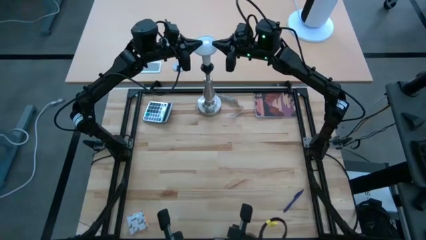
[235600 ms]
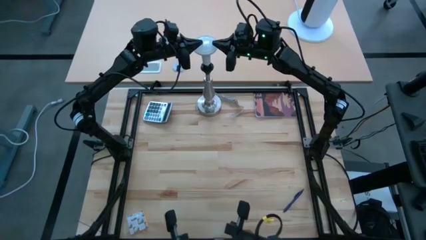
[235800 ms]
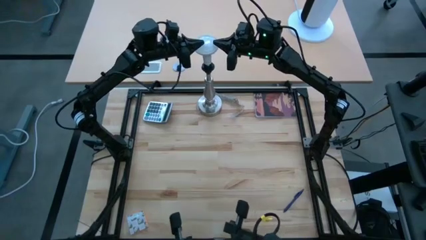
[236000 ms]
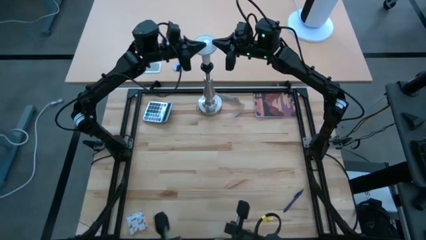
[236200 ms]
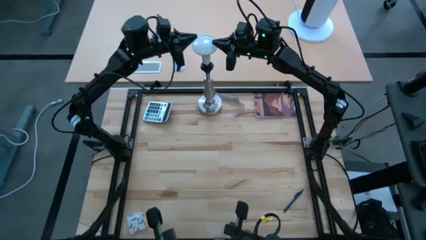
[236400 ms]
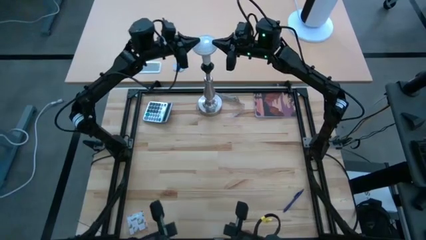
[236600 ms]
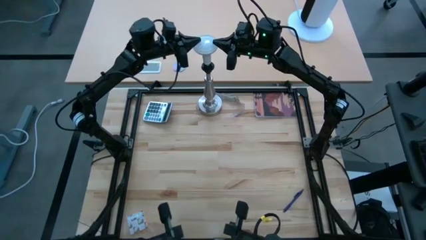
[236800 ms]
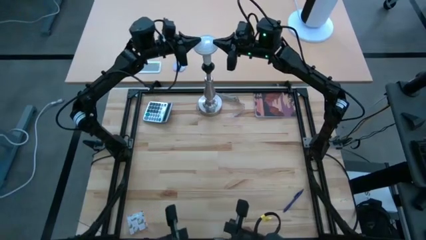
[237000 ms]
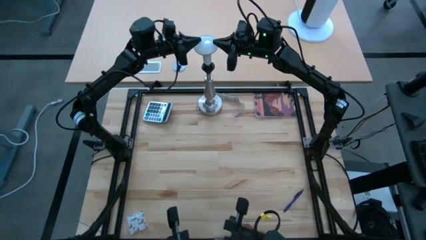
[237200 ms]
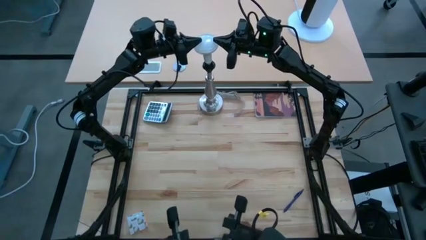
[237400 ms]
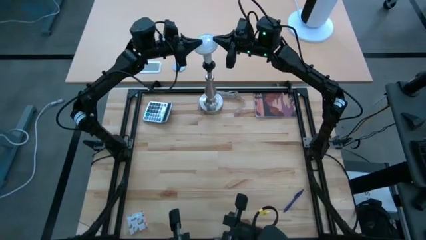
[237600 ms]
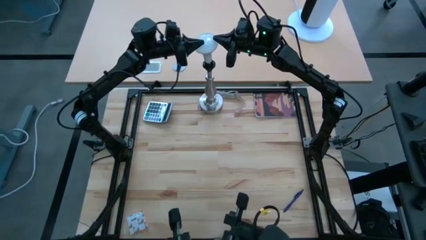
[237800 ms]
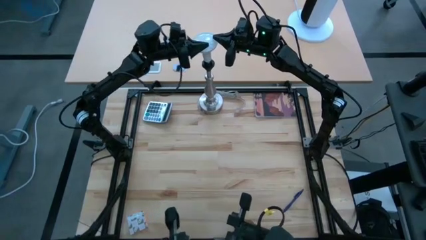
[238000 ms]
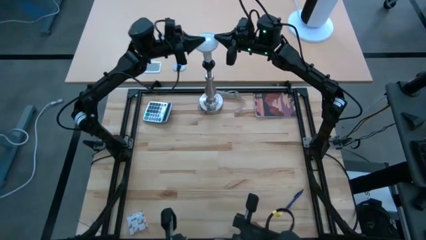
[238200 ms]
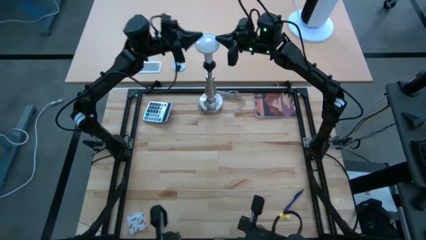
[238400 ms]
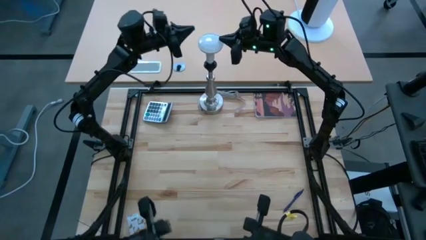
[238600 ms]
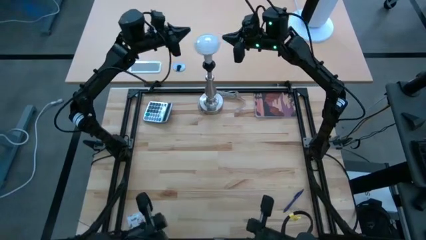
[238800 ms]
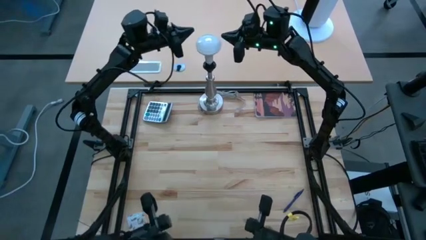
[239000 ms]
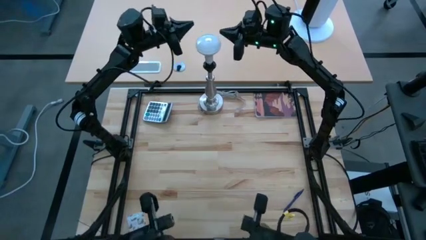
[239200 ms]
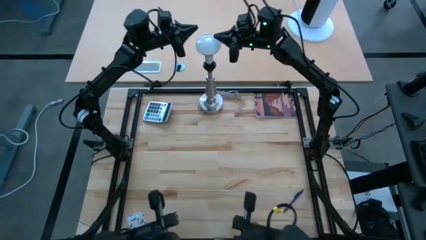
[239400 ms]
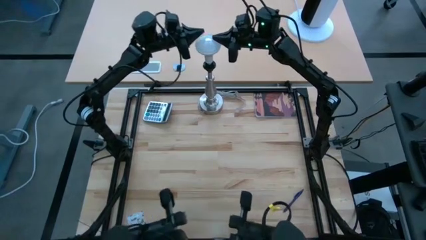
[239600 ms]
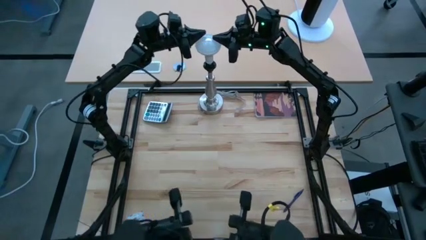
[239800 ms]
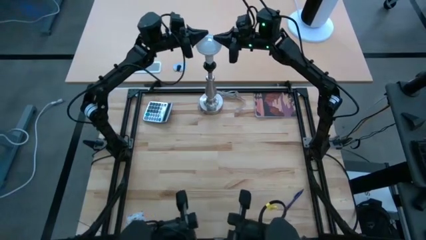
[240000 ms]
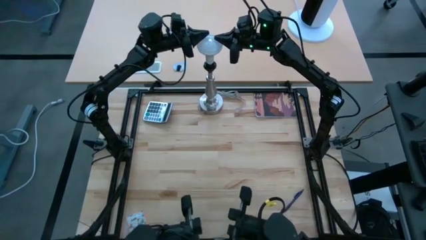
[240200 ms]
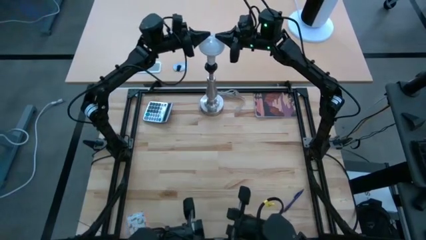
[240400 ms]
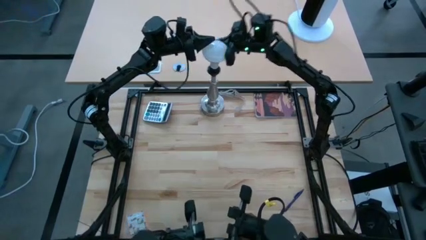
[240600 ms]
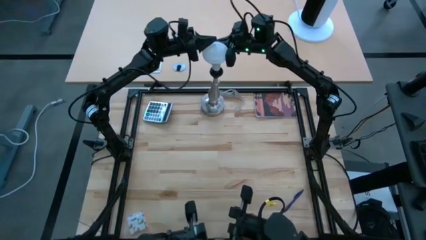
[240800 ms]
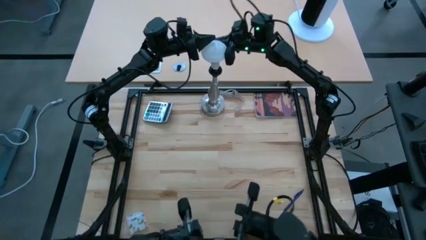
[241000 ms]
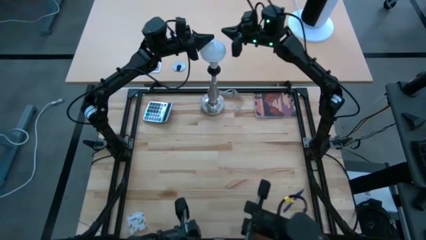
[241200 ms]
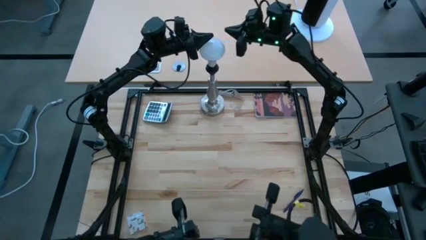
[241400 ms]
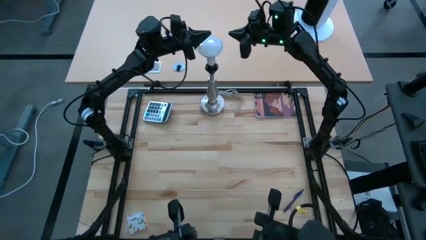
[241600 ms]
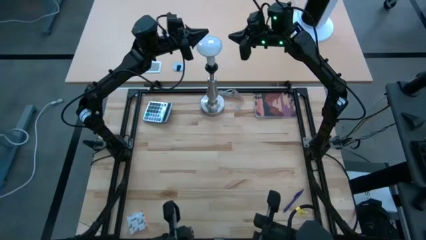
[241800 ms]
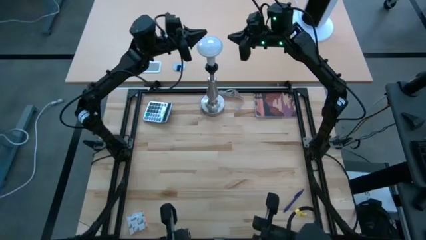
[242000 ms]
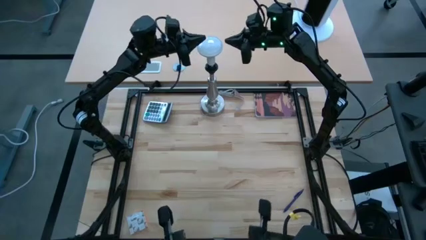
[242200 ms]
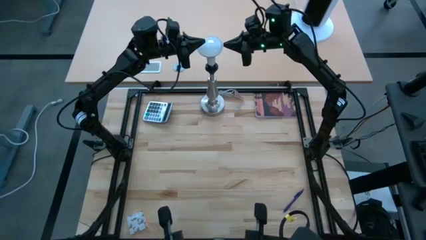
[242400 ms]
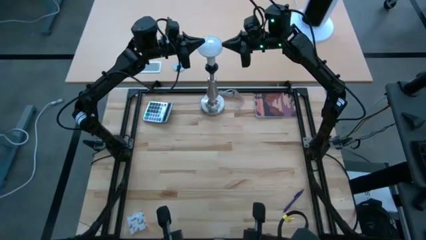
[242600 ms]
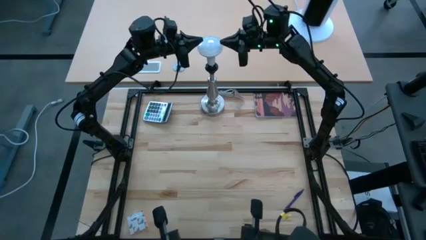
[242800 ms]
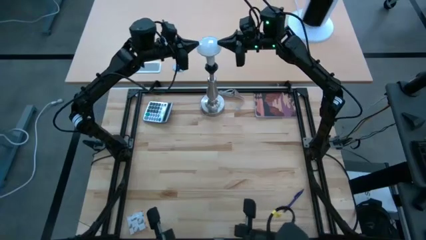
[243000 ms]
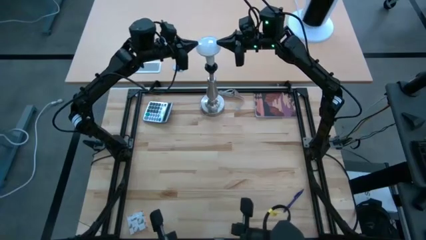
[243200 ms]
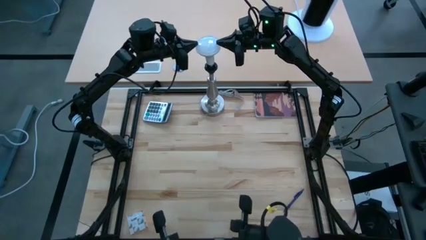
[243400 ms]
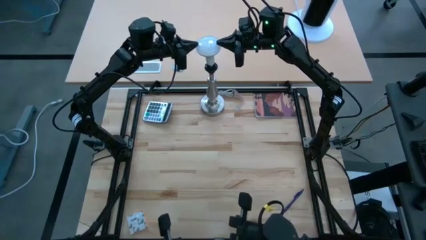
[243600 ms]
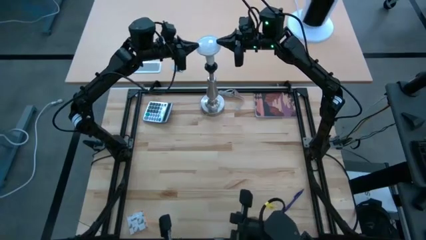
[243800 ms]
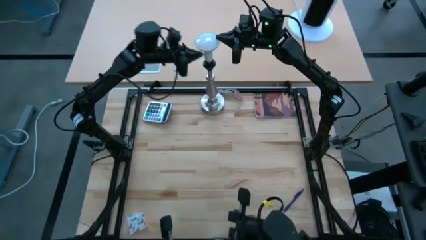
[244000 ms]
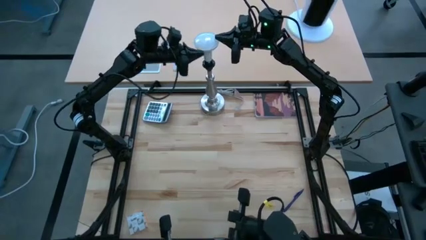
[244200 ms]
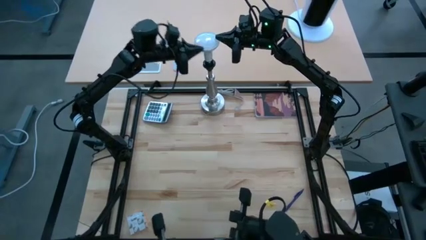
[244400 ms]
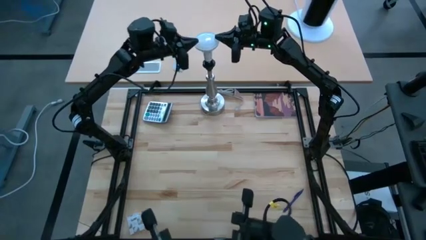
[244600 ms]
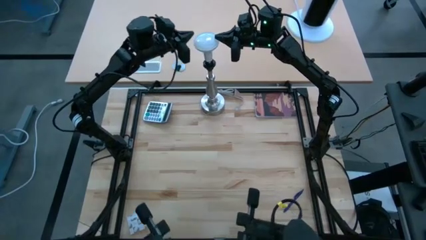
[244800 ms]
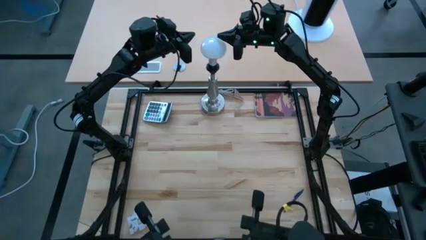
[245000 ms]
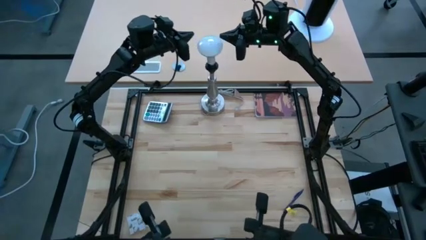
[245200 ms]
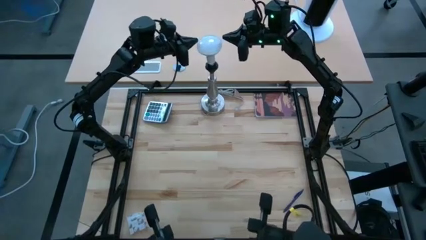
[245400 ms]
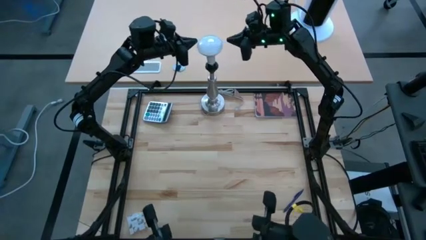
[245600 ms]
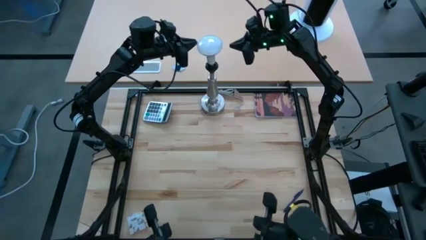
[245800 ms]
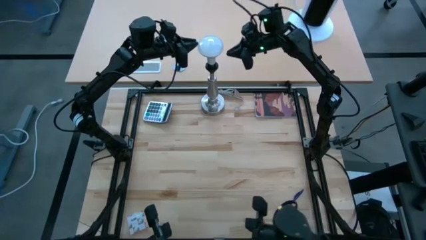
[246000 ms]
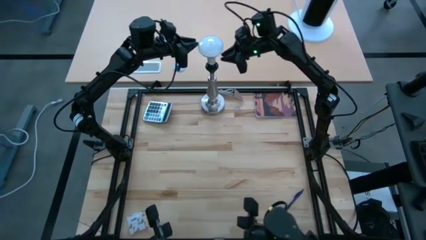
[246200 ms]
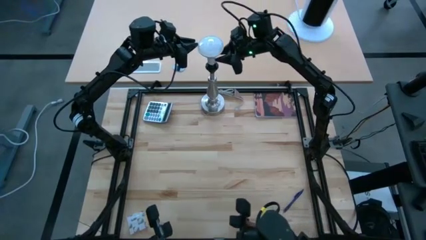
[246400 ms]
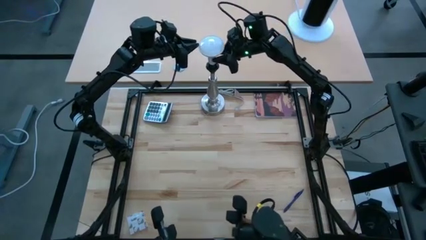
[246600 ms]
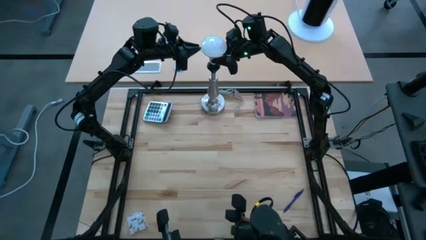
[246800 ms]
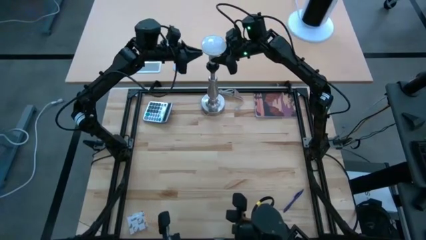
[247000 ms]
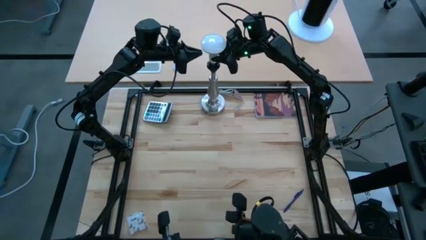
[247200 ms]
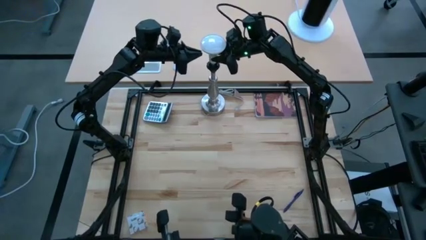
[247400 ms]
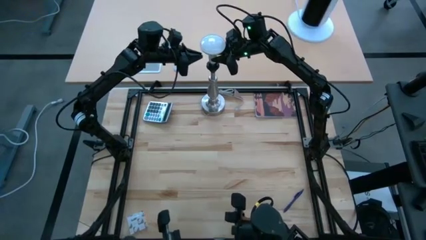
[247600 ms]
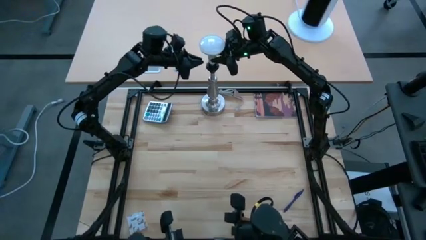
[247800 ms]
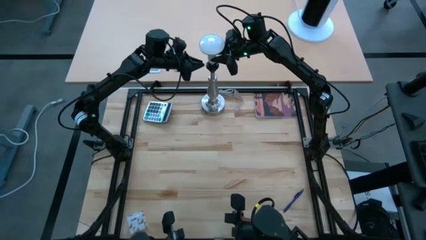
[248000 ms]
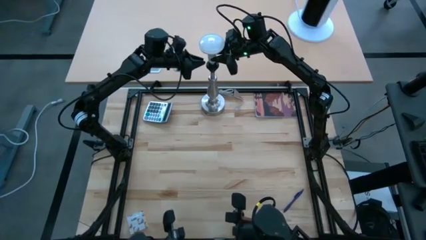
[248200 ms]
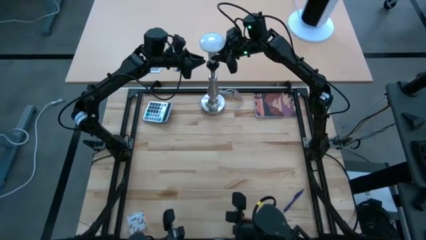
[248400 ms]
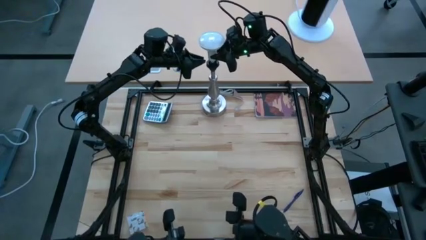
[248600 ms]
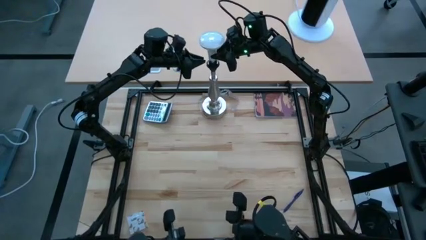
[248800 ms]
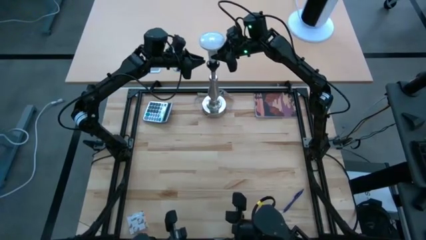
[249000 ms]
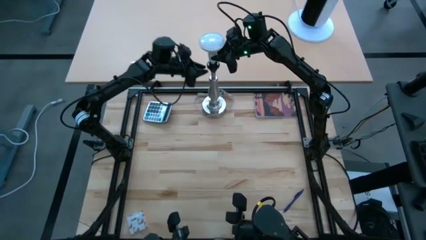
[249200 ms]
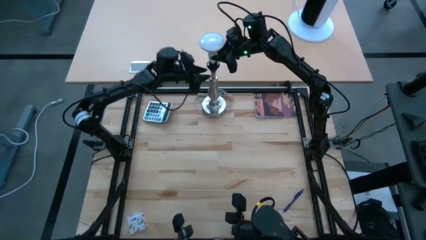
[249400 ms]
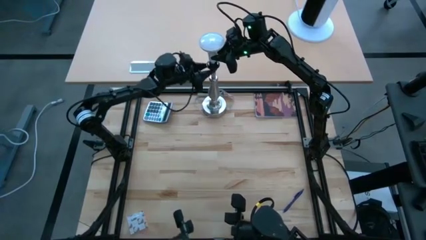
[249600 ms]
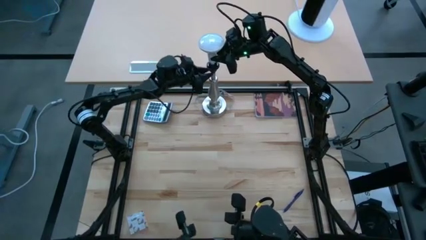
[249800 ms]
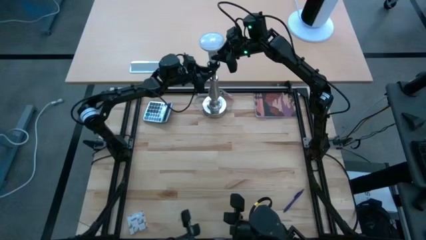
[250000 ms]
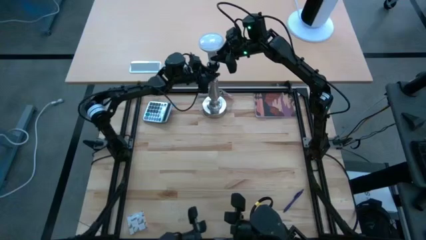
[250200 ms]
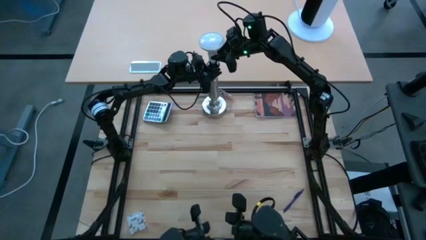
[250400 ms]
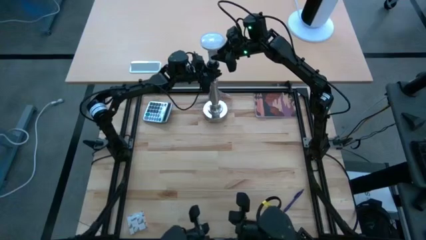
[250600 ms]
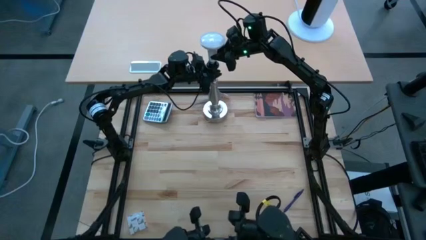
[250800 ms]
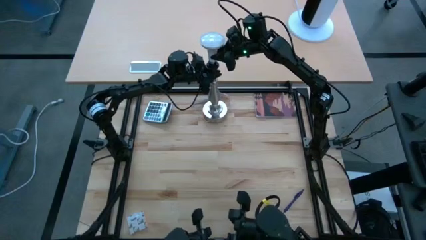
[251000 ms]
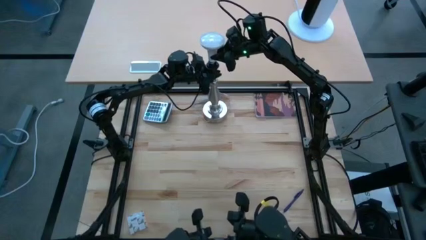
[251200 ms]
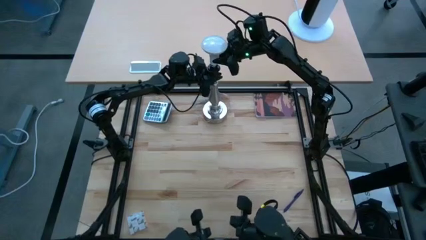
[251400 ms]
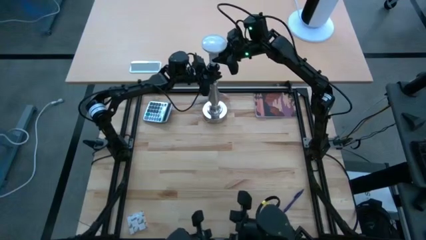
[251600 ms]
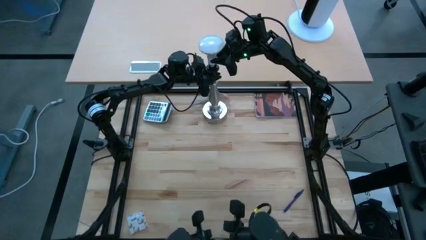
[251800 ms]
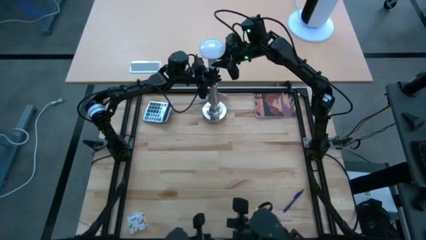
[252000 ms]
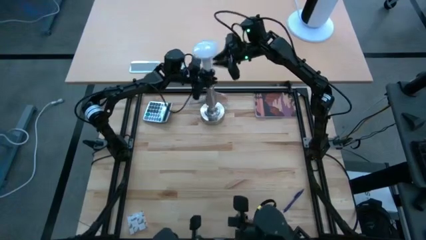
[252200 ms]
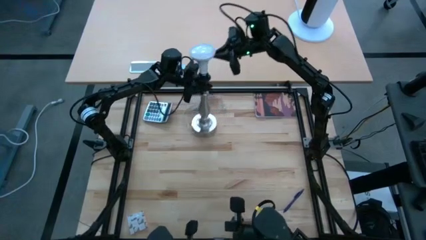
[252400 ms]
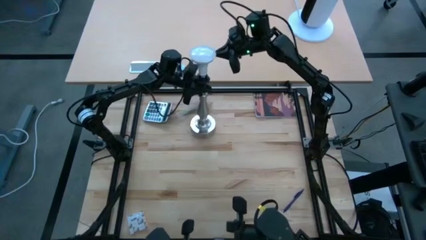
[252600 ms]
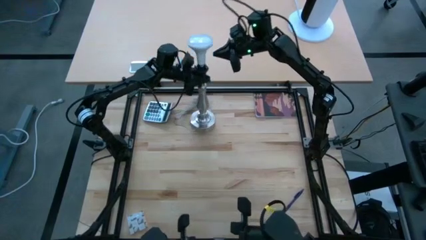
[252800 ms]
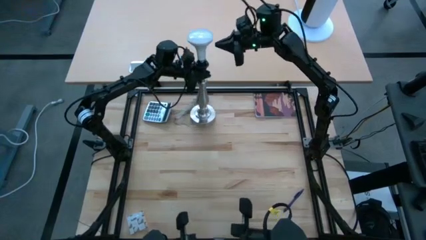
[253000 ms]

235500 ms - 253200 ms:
Task: Screw lightbulb
Remove the lightbulb from the table lamp
